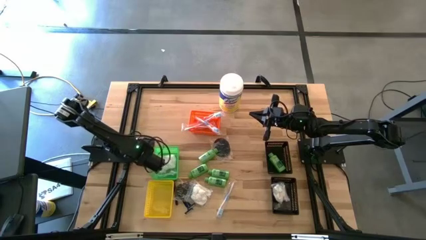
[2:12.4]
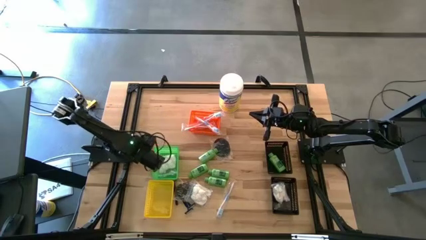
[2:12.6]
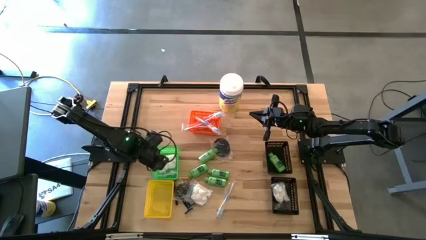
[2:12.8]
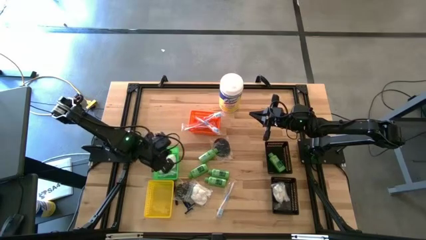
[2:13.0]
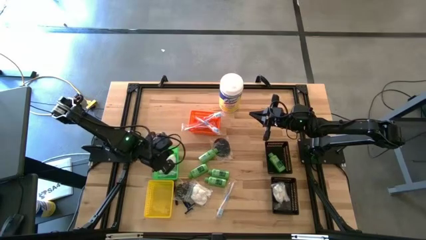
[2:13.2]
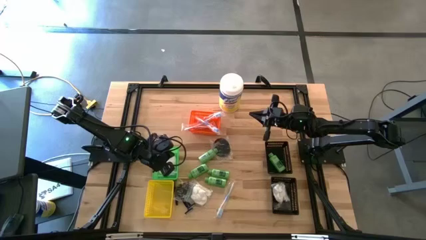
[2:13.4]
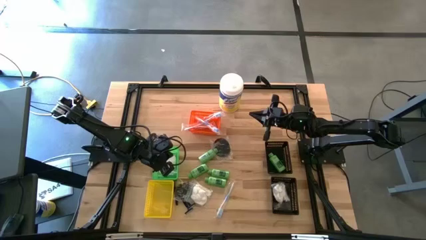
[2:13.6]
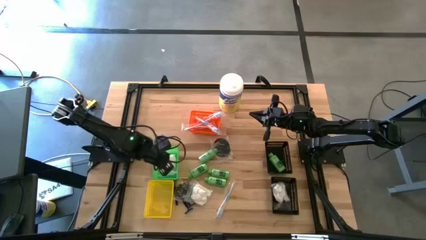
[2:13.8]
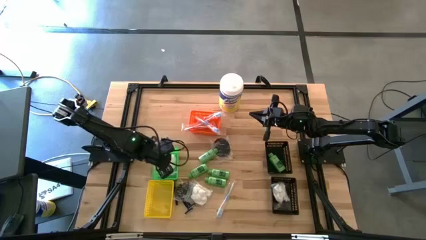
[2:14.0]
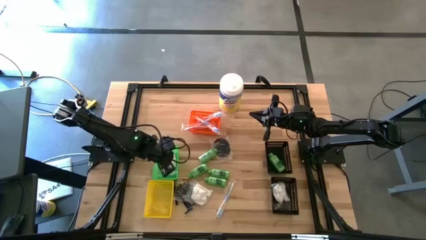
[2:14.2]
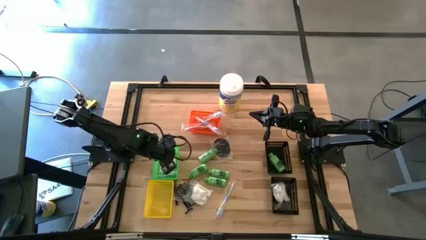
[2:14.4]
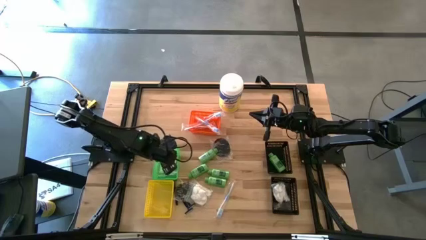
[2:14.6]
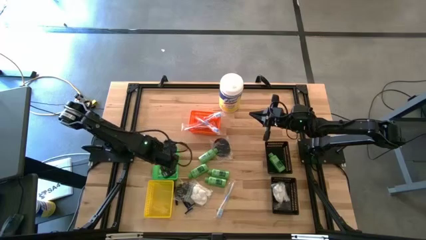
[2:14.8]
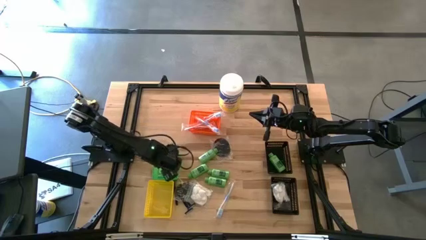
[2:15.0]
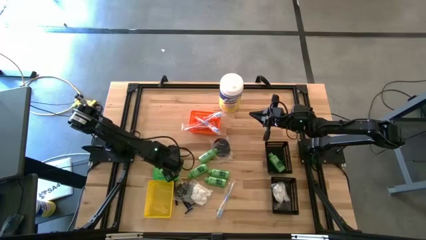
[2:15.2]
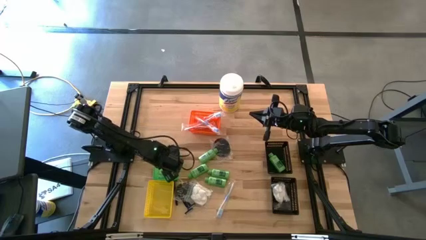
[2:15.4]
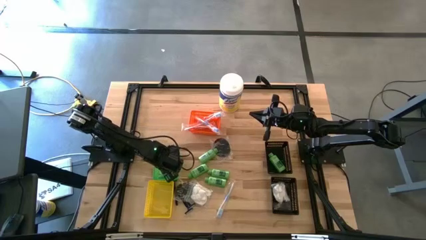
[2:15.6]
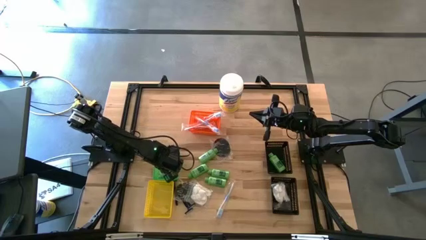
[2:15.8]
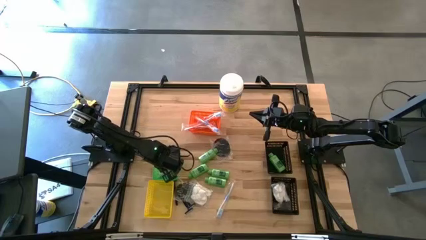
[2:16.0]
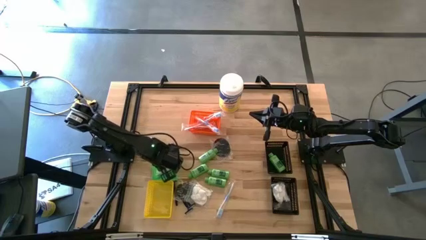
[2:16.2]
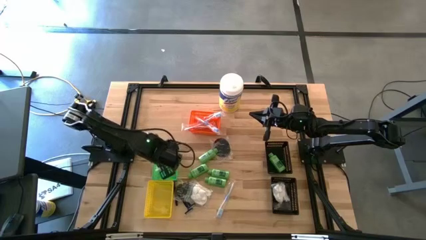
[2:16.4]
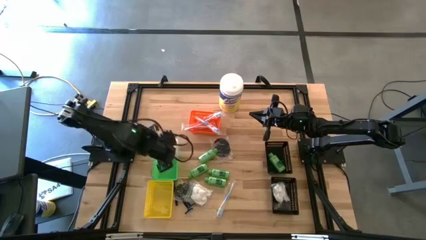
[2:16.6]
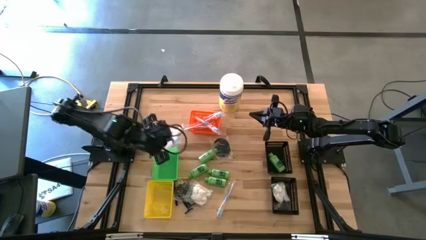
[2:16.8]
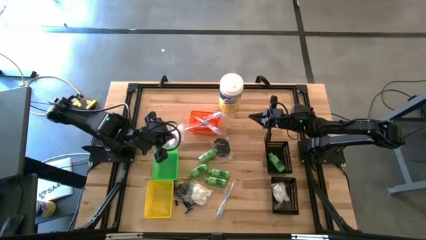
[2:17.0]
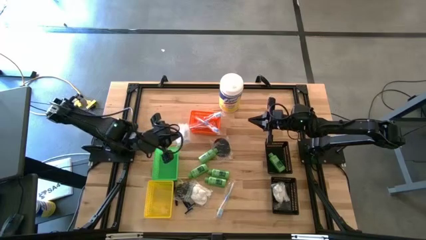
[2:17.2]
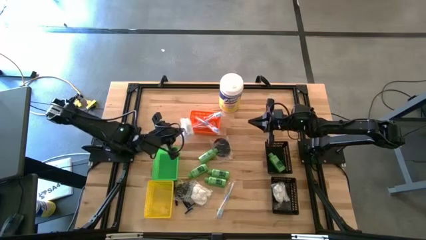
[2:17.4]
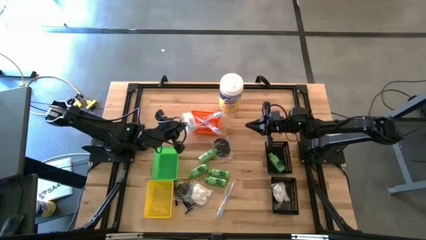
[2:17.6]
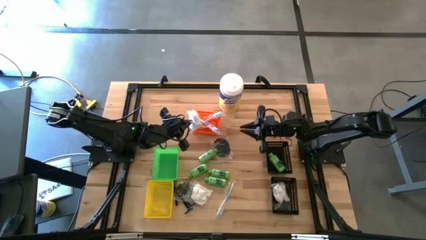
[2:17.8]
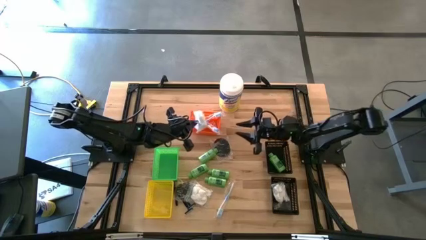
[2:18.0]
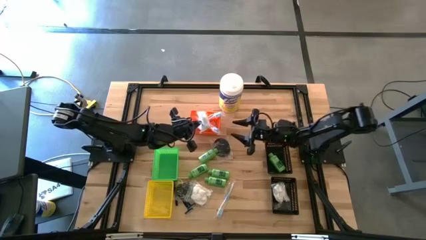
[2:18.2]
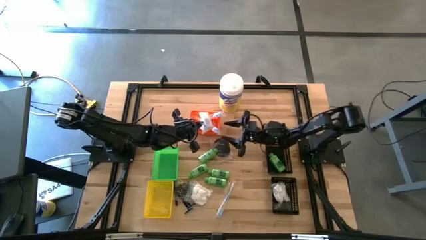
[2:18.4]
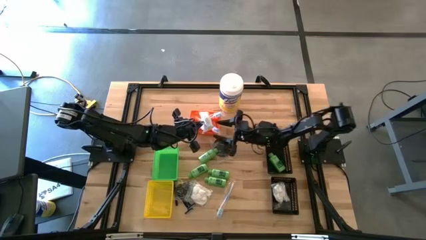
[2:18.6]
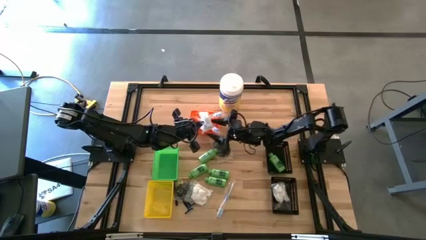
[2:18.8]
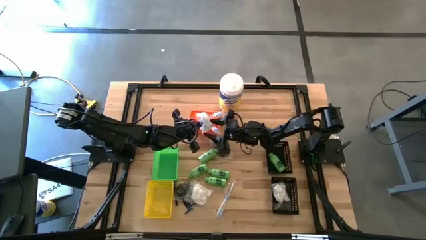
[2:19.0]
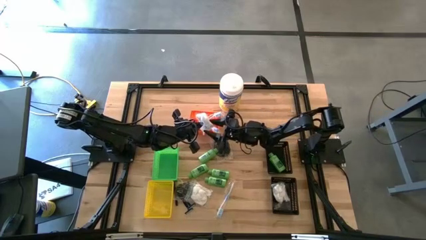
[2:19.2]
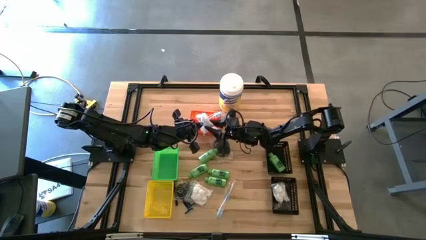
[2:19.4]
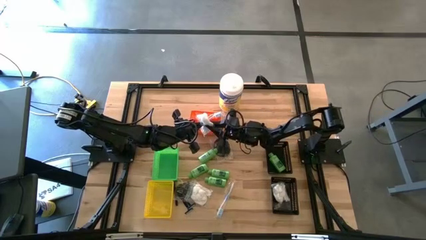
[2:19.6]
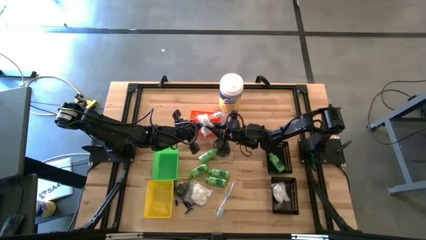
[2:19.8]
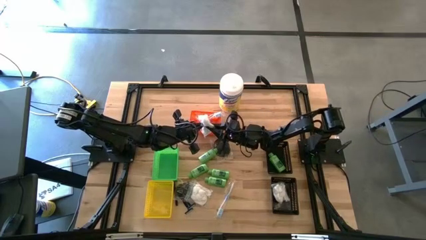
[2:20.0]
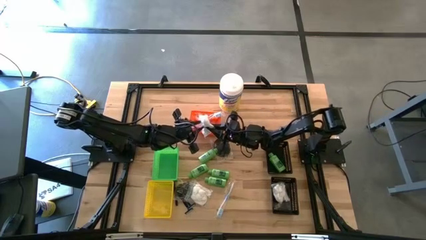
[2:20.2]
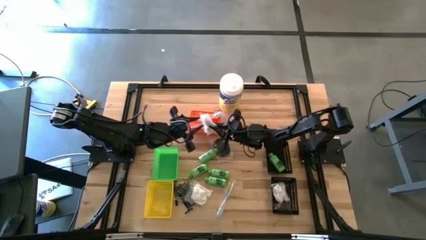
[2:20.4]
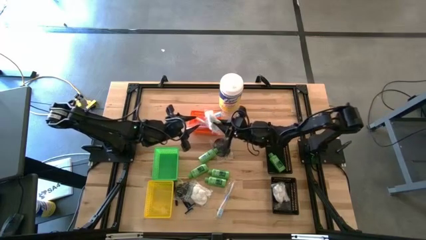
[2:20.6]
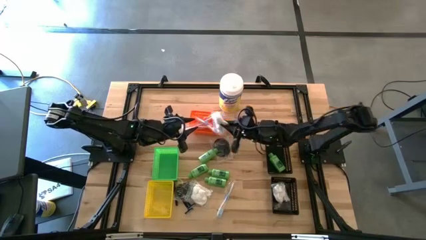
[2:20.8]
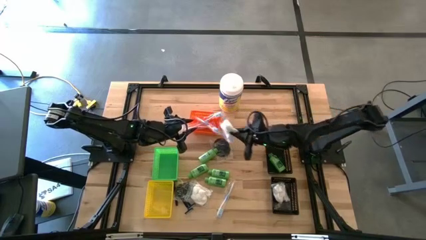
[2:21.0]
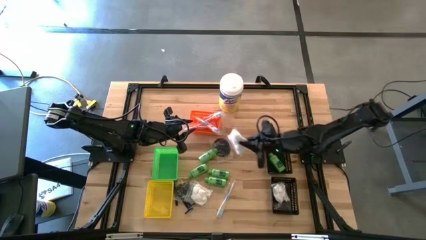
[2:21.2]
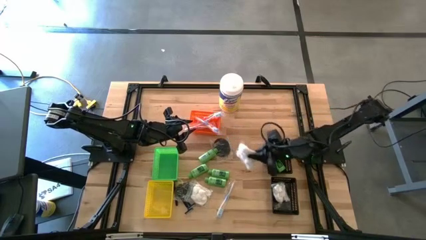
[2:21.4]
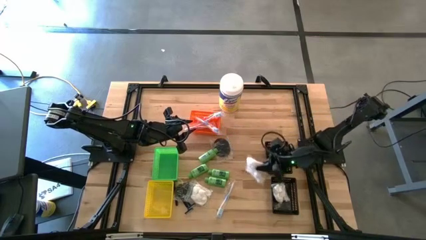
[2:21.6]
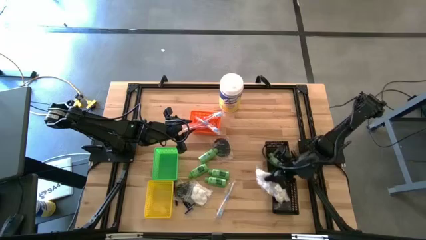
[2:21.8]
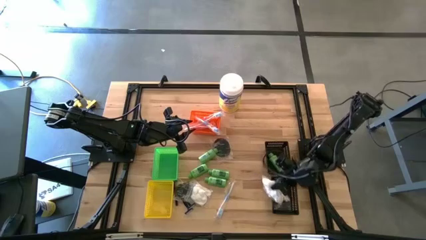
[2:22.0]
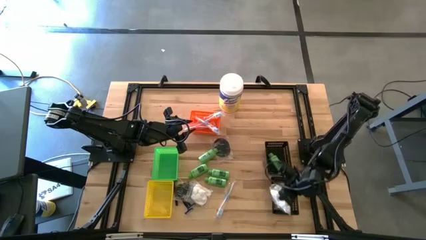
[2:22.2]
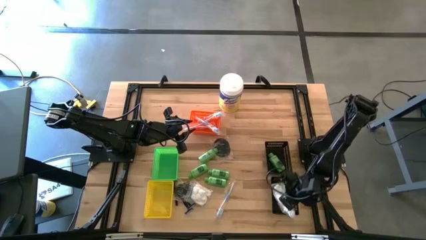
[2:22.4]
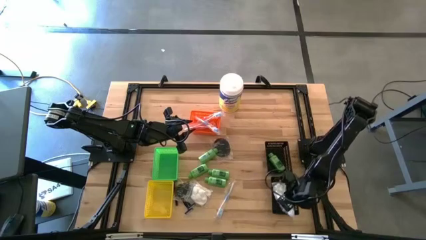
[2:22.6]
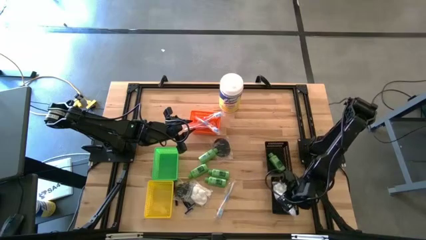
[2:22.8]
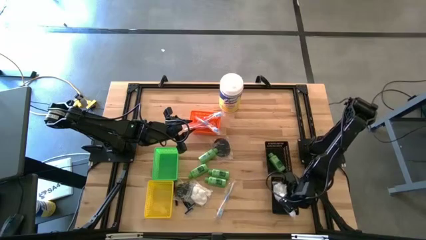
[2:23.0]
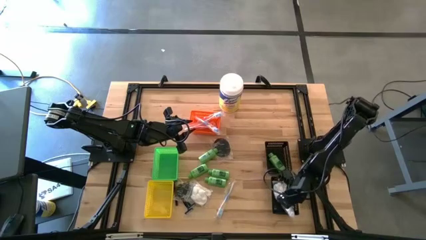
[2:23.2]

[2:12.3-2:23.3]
Task: Pick & Place Travel size toiletries
Put the white cotton pack into the bottom black bin

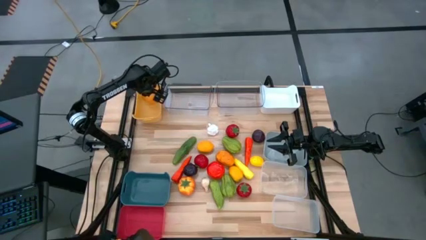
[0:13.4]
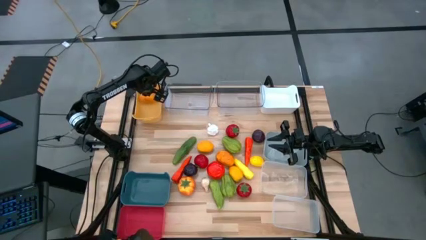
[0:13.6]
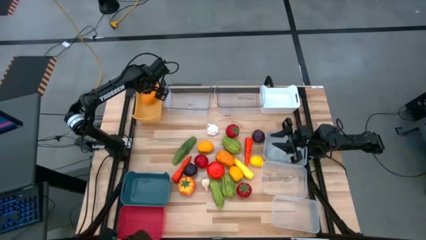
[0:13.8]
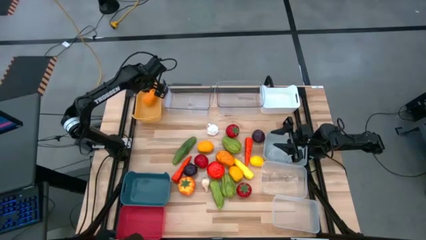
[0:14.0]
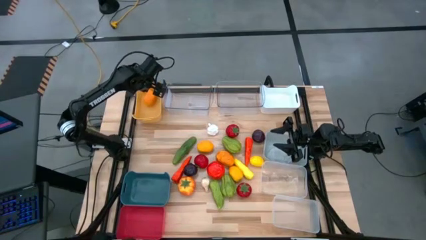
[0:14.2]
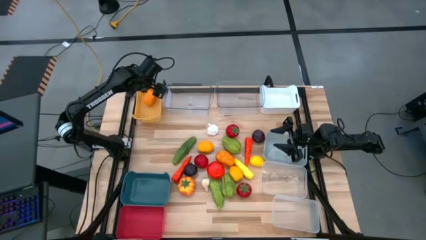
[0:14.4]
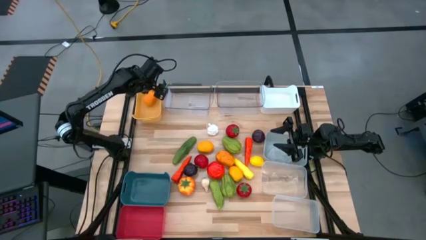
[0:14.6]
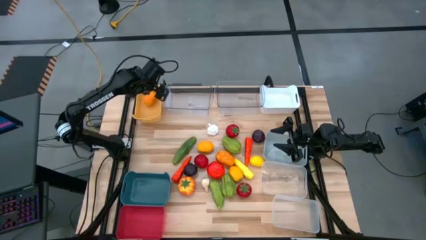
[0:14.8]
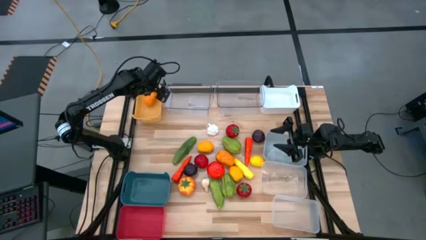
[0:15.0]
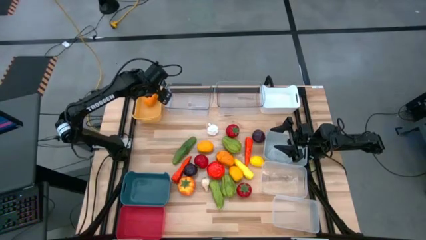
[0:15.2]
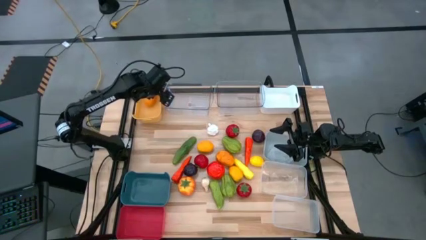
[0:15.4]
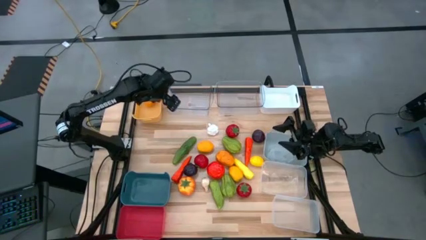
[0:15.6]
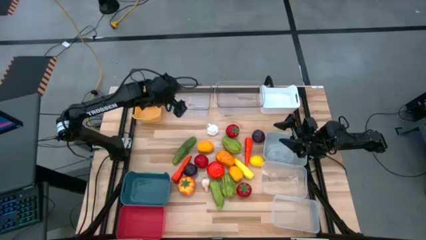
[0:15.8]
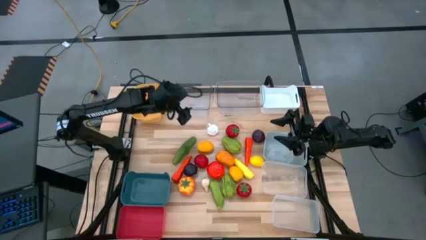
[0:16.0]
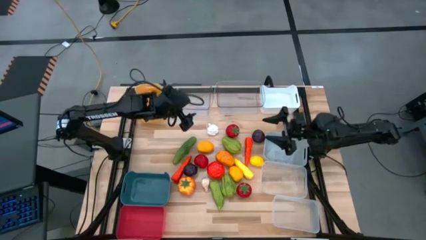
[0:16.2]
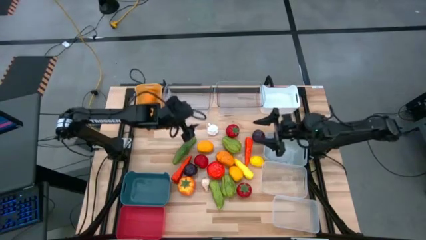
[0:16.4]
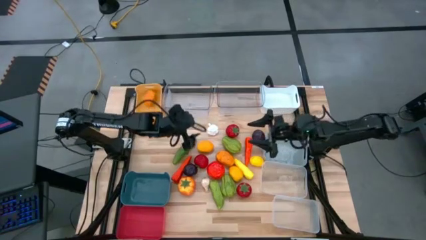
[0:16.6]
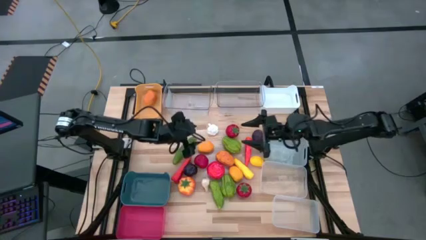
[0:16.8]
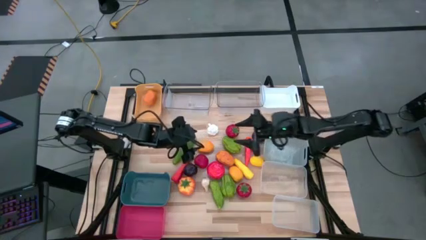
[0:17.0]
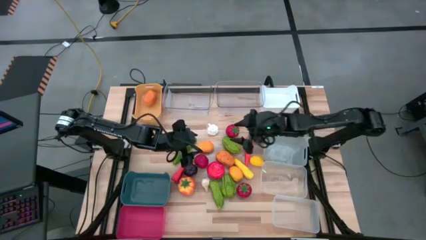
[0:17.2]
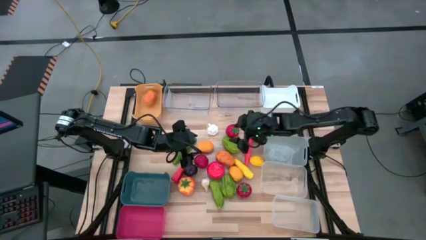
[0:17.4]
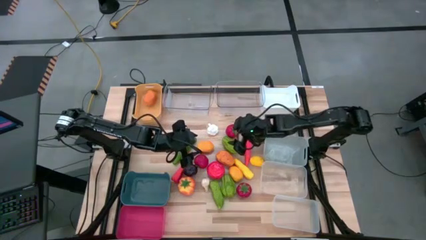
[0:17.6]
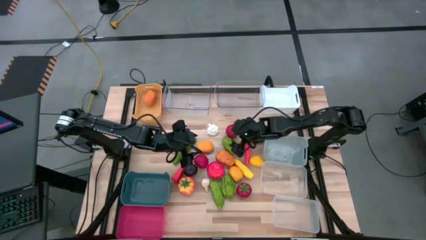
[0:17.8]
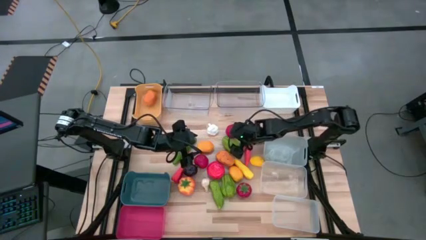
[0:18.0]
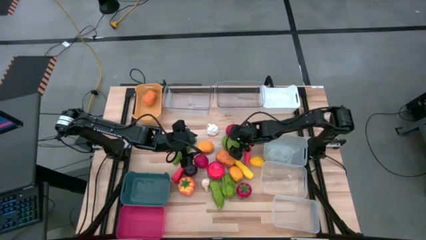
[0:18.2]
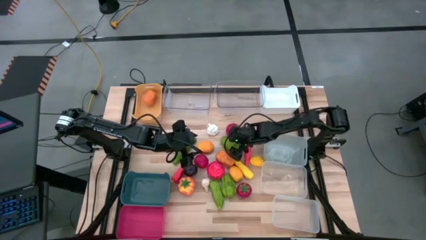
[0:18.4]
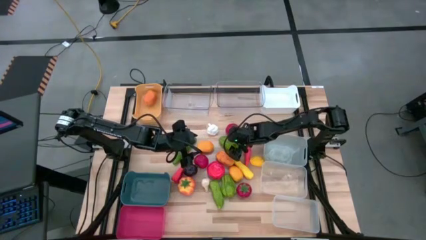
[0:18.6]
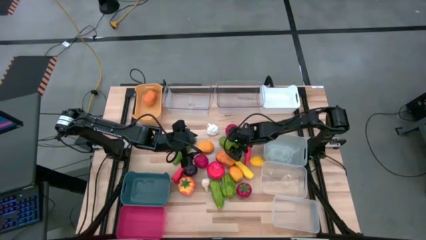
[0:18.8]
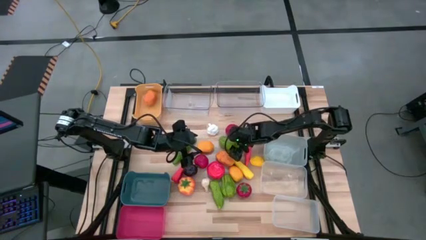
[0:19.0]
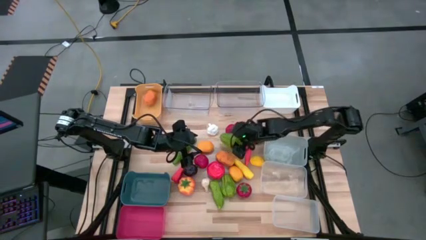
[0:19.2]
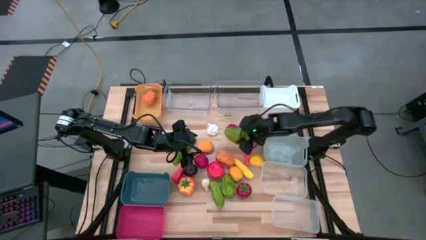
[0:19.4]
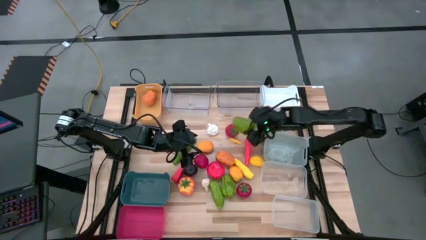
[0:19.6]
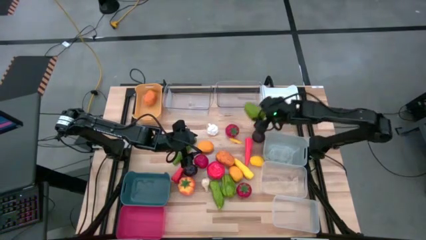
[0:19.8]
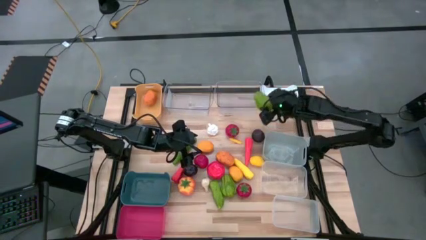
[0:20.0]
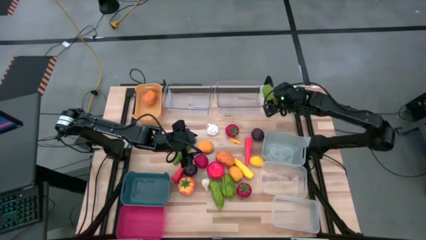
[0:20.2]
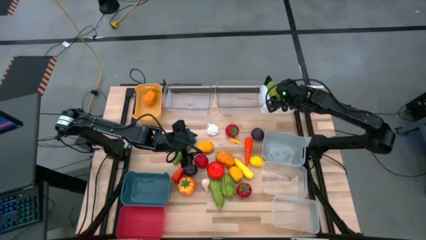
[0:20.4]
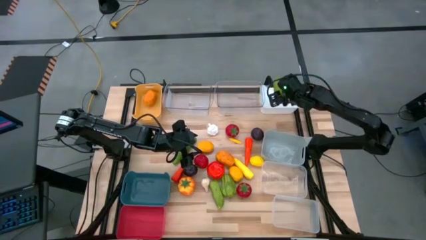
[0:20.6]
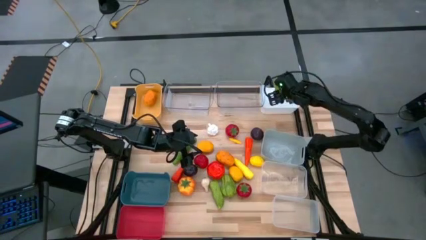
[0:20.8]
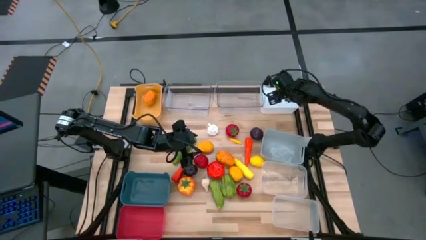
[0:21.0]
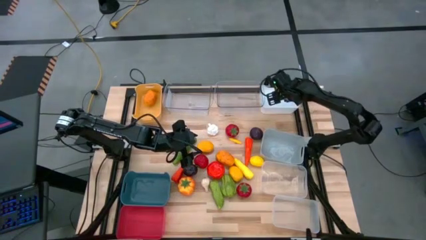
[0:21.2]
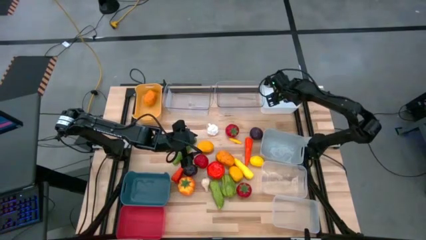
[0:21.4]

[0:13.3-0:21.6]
Task: Sort produce into baskets
Put the green chayote into the white bin
